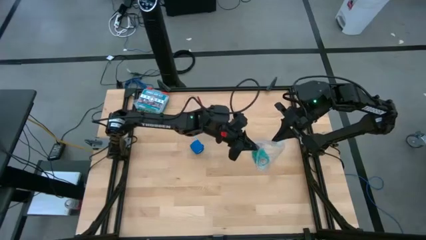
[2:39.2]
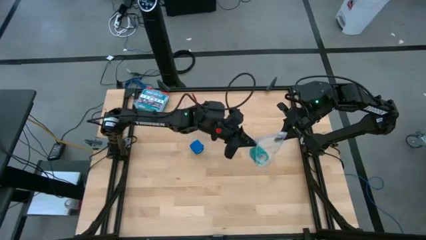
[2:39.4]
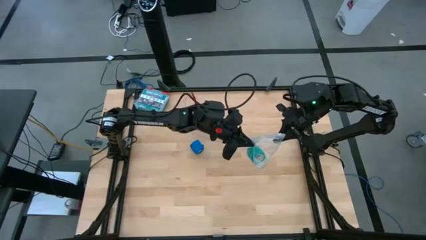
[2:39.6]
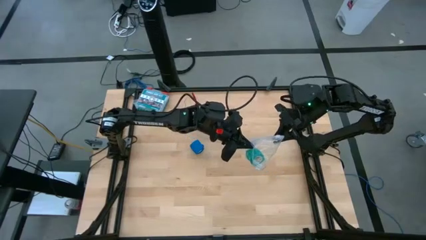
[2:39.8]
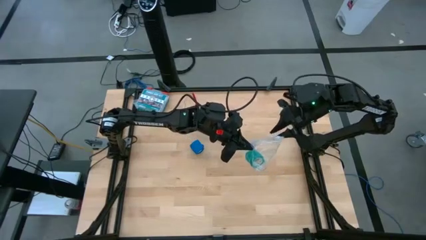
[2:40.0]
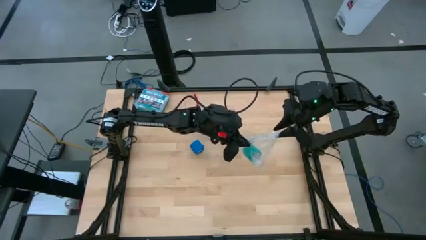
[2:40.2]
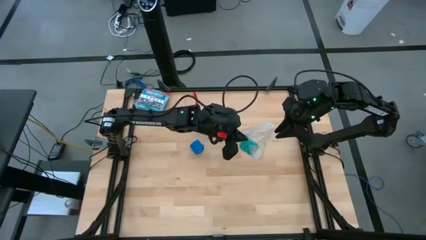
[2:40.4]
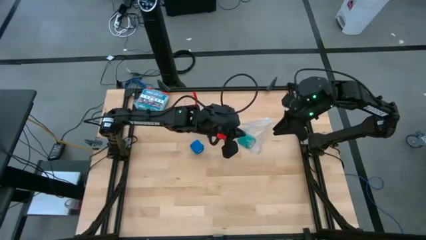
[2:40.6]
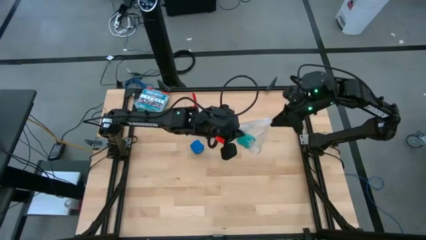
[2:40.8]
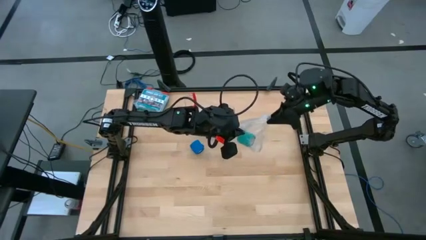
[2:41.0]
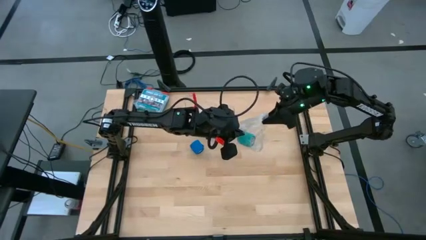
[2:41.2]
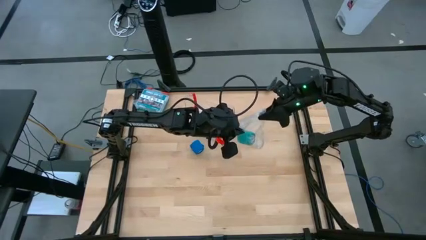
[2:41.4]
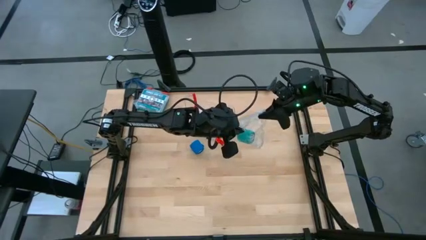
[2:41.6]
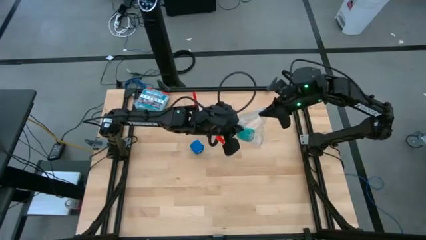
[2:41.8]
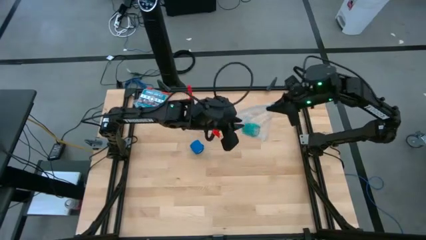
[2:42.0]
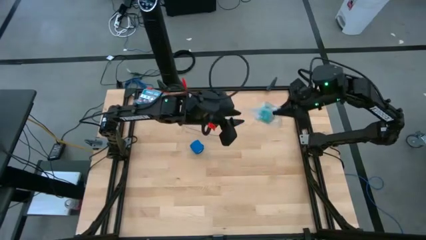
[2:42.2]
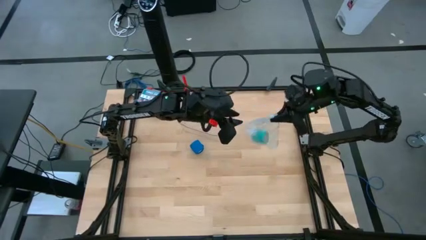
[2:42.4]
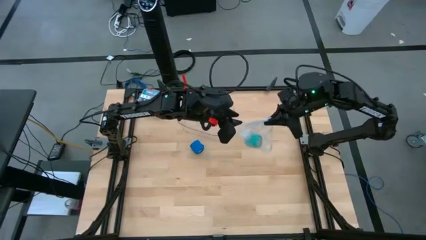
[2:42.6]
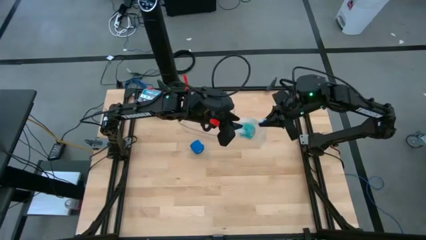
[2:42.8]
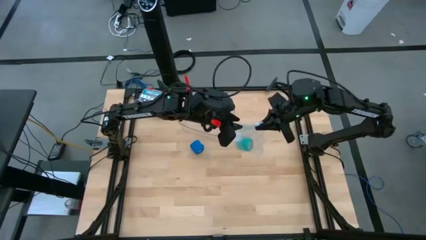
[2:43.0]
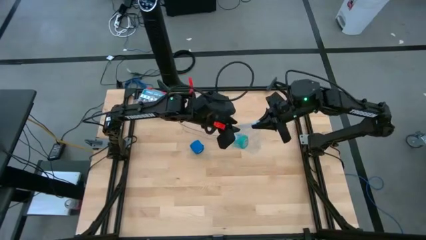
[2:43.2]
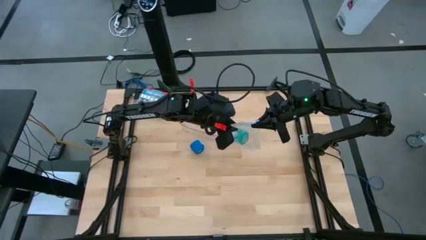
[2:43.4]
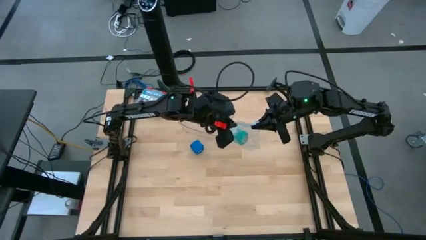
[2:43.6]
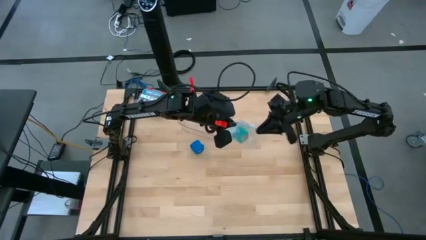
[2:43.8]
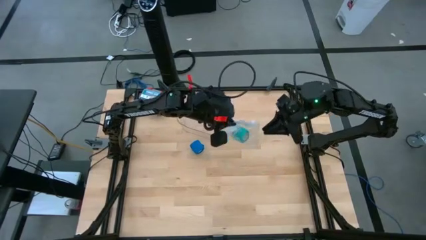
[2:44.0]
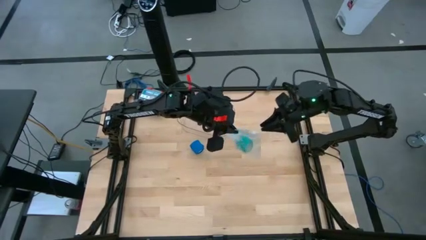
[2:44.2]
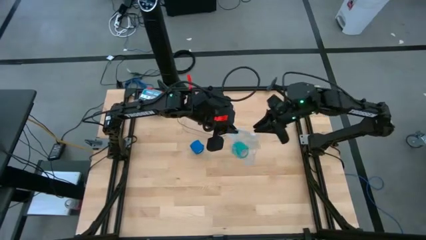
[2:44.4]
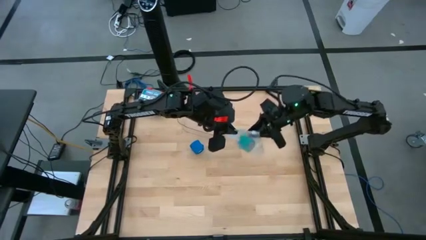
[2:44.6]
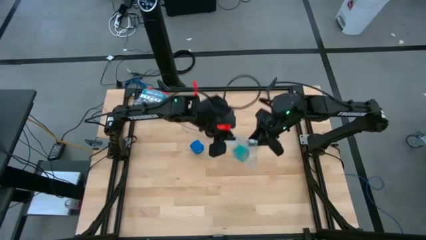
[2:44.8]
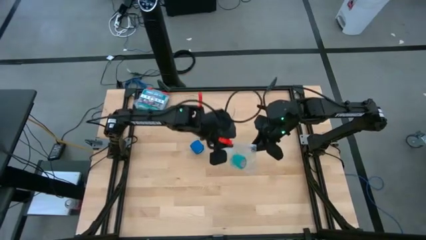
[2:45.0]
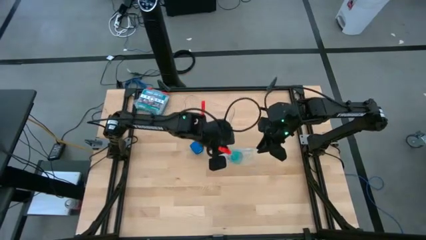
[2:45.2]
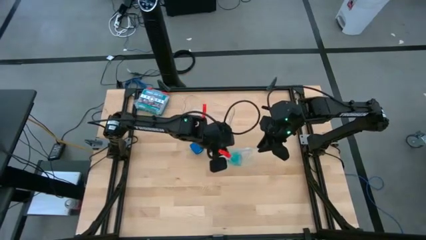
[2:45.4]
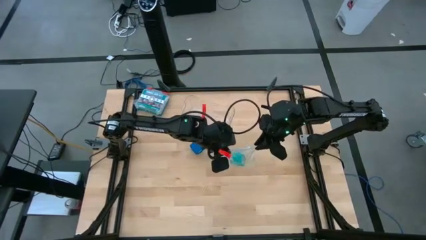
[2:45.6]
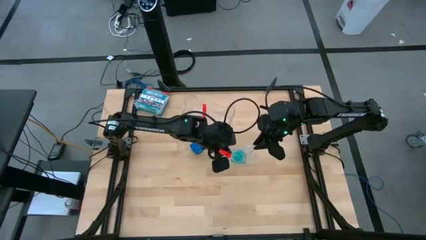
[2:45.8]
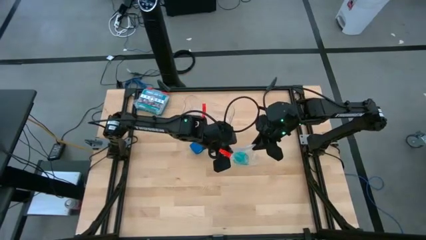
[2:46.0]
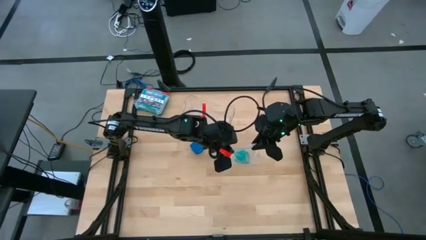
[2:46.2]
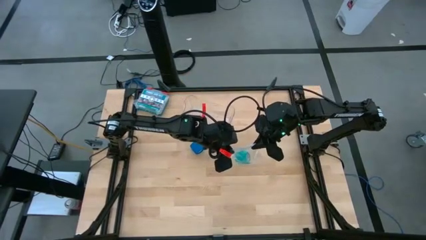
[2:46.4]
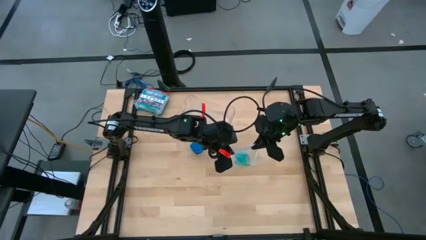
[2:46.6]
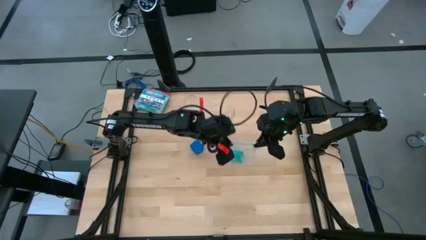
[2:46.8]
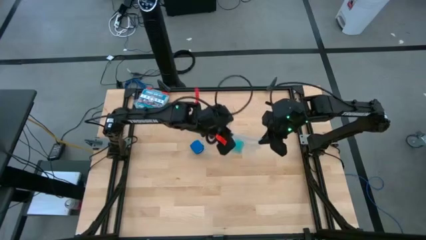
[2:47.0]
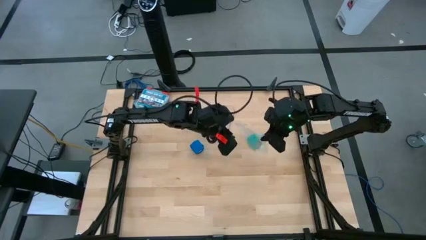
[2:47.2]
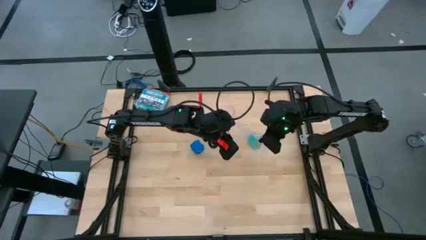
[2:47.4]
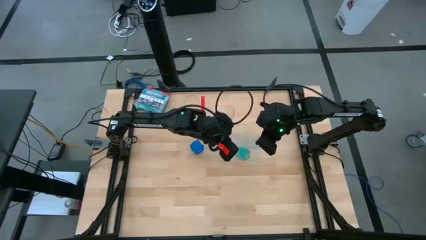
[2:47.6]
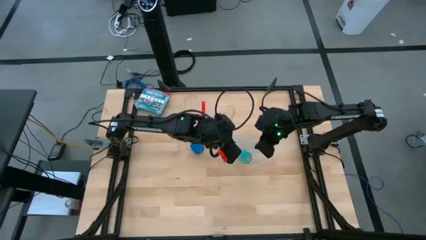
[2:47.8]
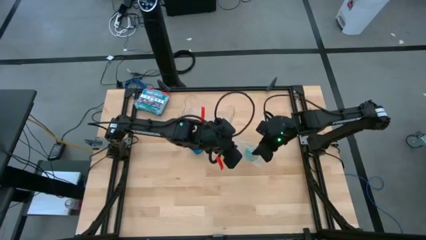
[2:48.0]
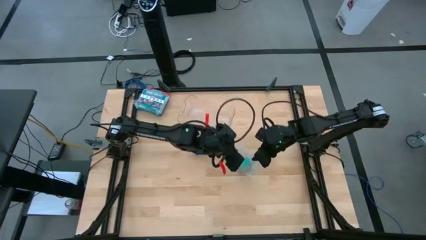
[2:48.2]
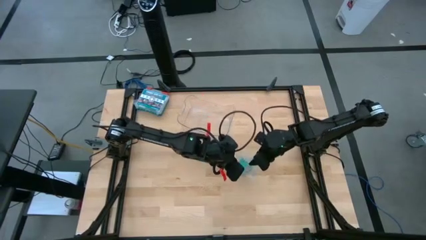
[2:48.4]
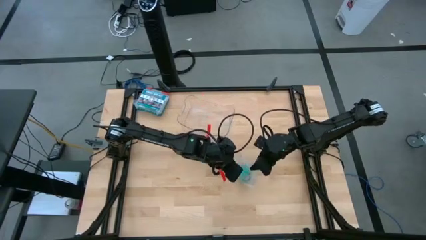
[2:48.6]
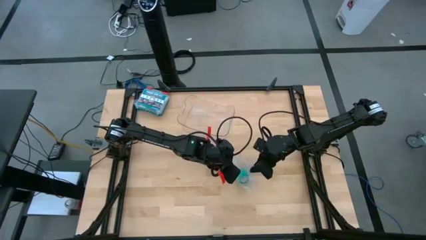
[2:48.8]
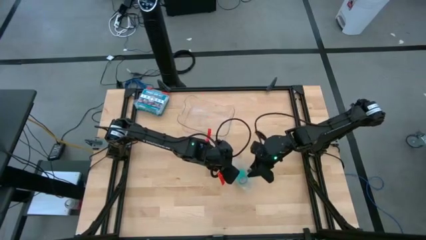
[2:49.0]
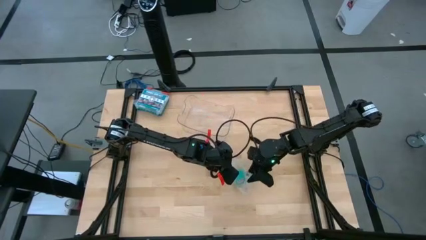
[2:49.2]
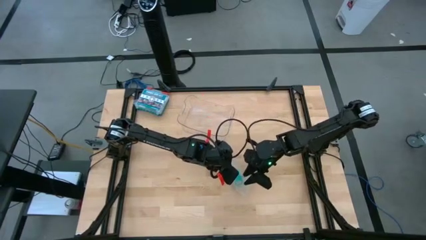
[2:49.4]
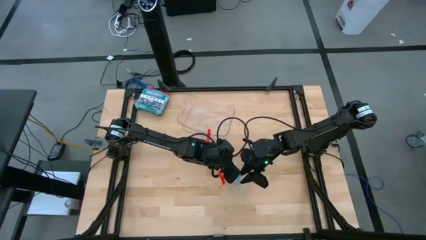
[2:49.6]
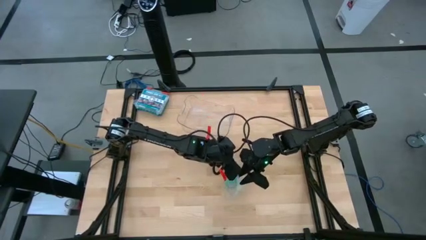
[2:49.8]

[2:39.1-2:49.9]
Task: Roll bandage
Open the transparent zip bag

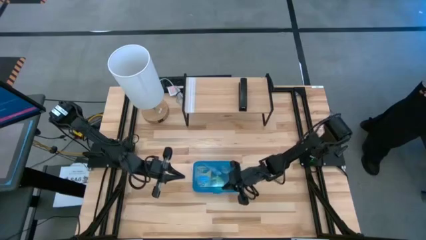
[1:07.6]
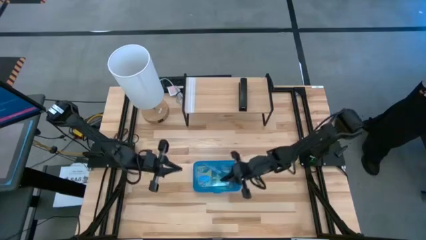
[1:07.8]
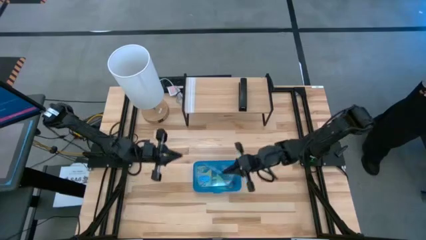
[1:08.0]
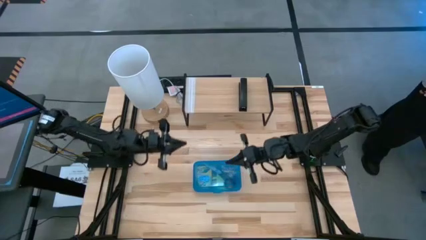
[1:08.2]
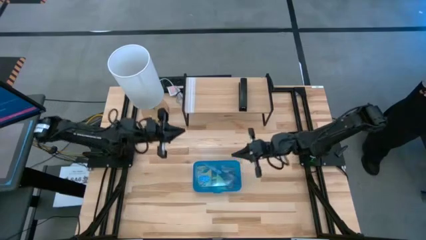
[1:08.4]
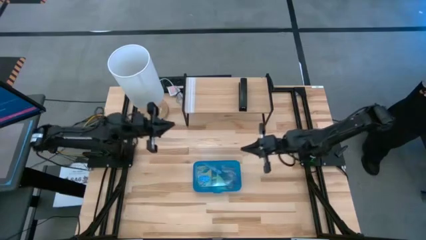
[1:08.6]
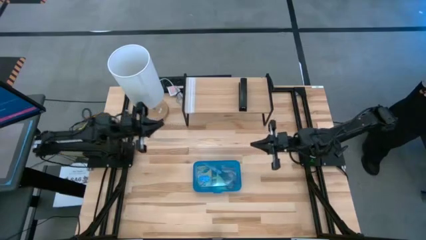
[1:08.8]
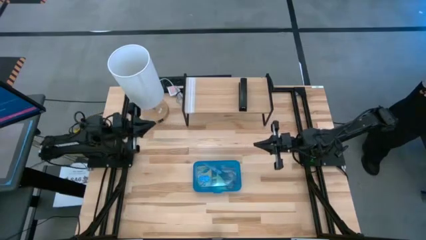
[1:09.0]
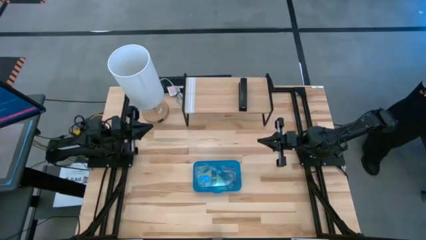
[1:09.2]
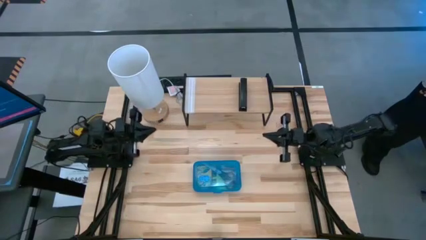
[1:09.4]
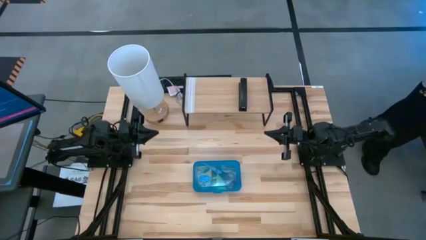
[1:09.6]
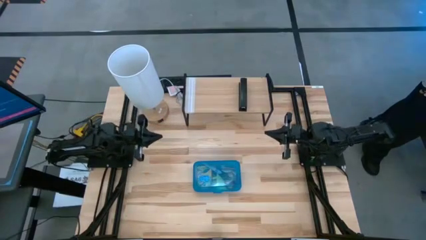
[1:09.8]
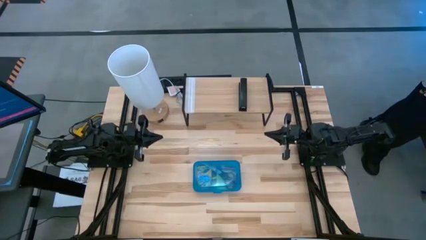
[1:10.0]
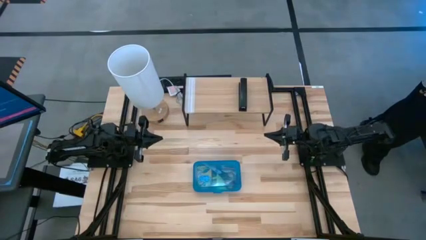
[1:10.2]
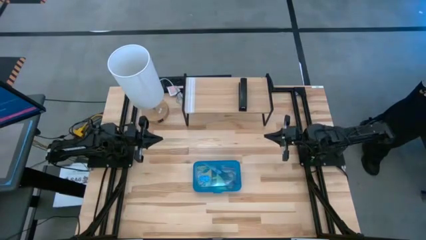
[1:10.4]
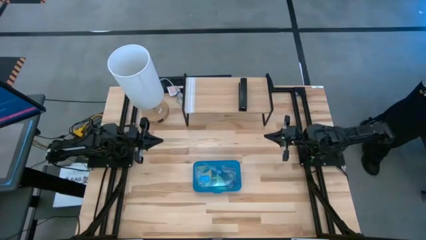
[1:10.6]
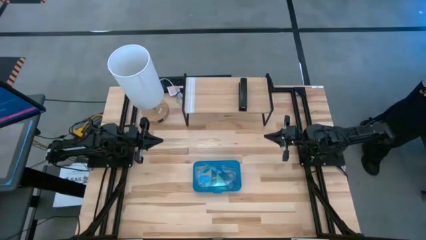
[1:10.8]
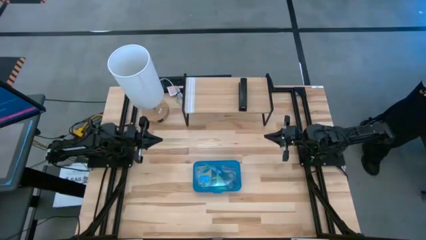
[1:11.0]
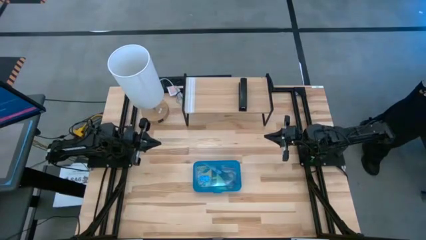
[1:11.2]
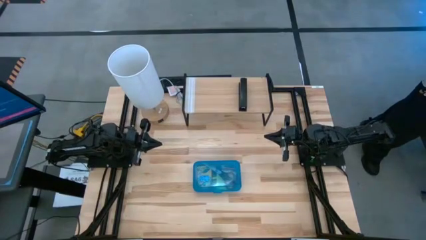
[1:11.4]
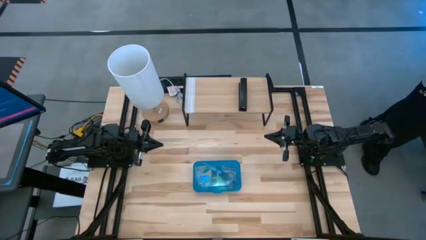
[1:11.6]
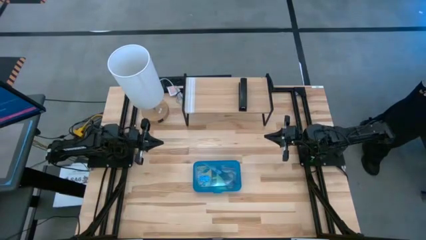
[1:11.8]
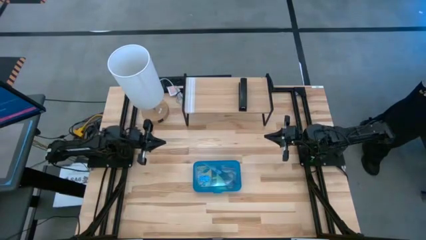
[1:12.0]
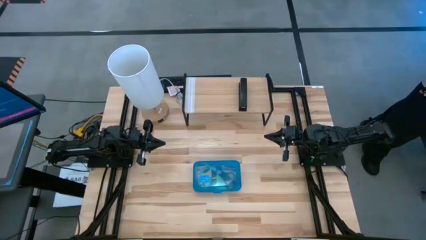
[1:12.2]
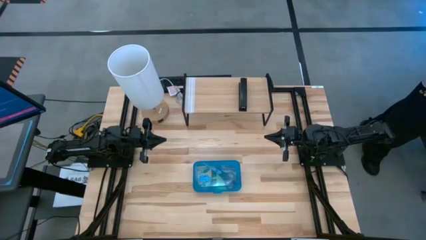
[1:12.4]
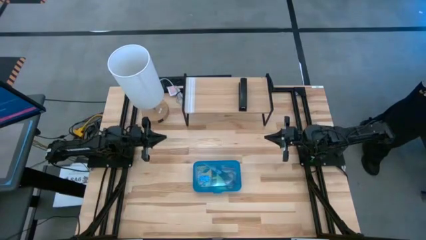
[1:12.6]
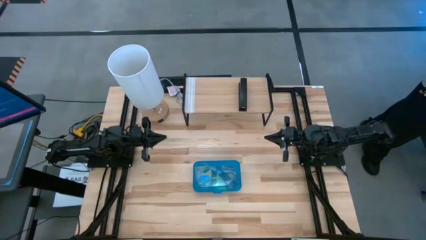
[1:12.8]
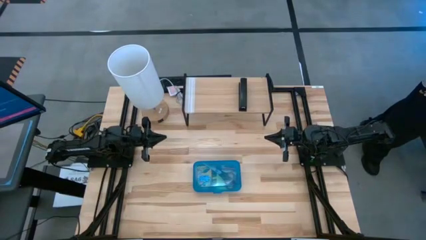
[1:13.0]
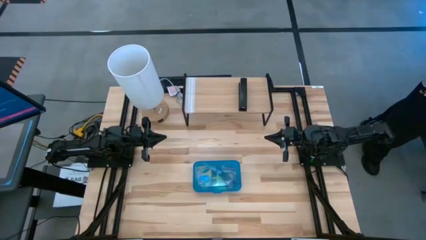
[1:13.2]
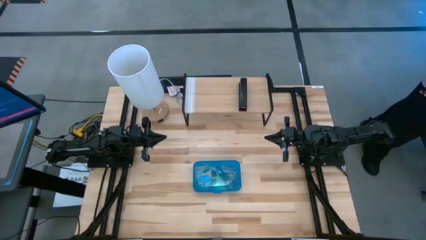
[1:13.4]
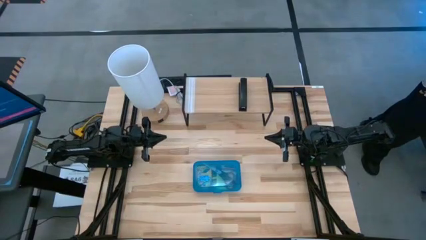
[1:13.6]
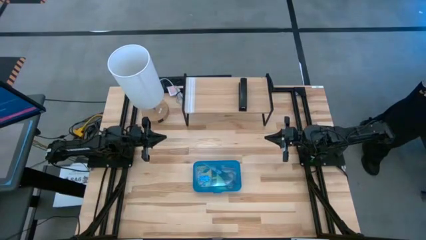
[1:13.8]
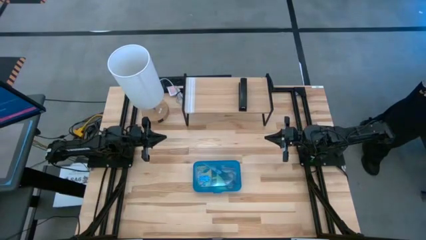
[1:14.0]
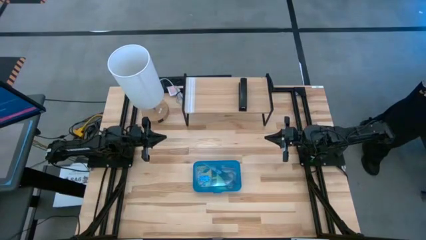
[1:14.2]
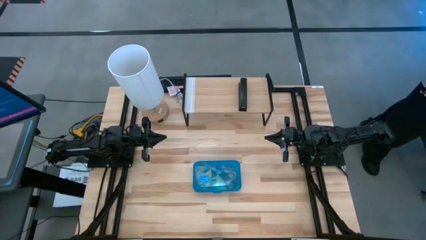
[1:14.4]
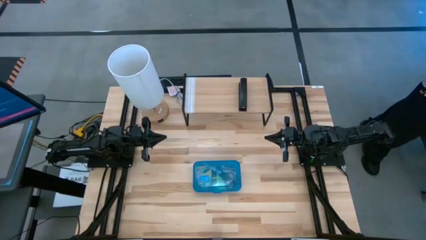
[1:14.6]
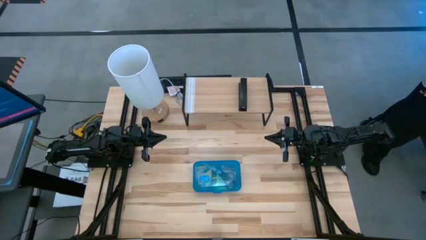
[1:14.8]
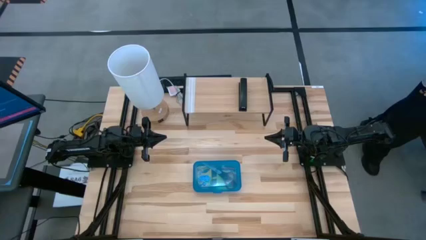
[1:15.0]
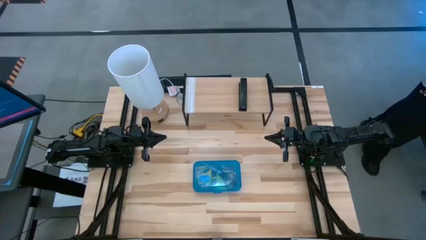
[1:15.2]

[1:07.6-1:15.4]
Task: Pack school essentials
Return to Home Position
